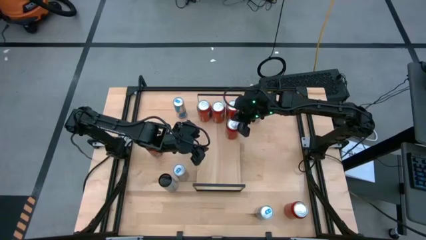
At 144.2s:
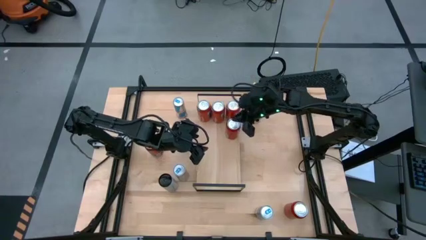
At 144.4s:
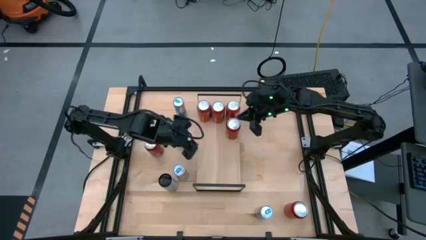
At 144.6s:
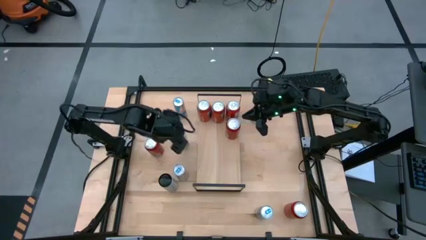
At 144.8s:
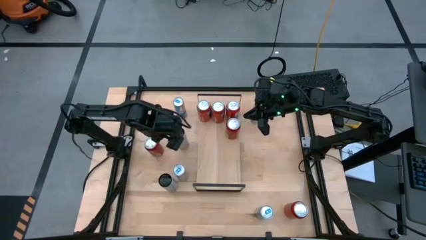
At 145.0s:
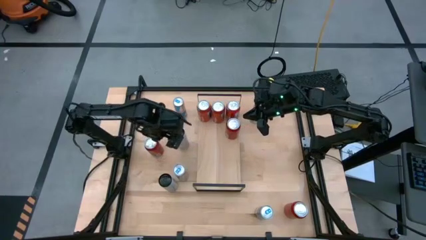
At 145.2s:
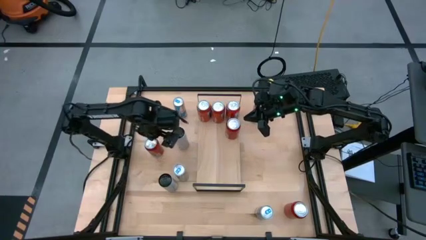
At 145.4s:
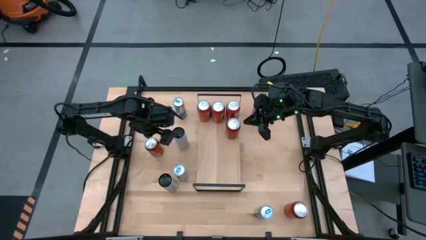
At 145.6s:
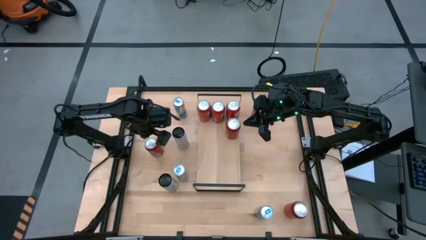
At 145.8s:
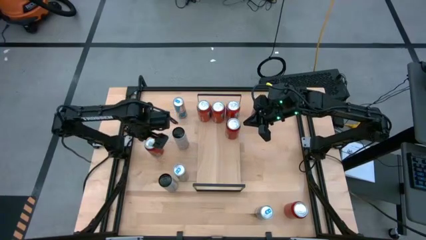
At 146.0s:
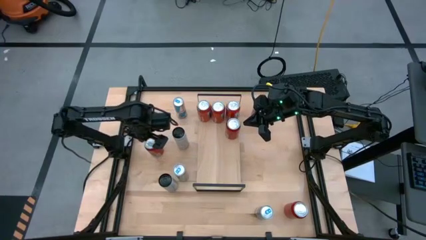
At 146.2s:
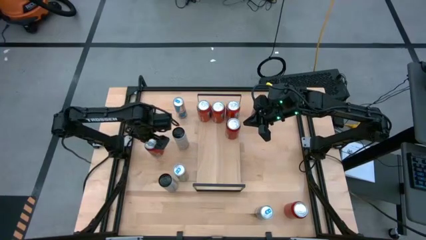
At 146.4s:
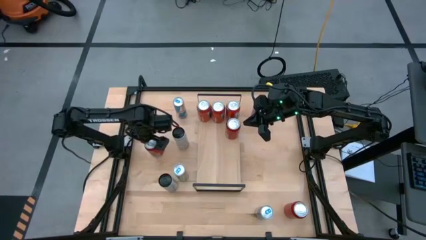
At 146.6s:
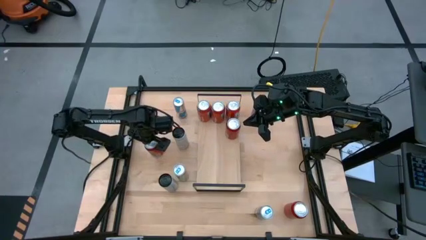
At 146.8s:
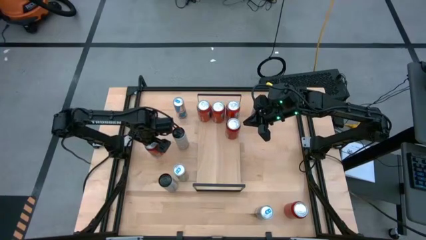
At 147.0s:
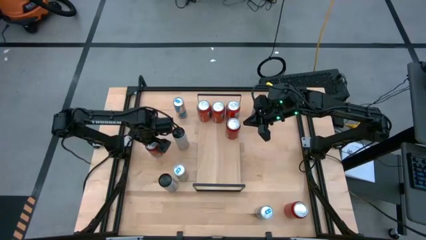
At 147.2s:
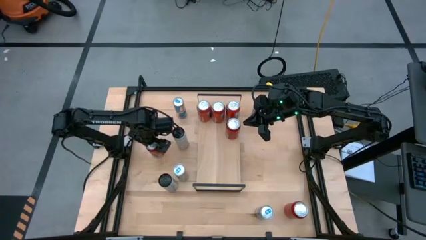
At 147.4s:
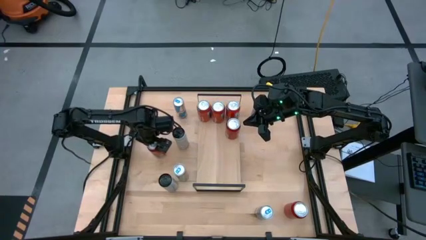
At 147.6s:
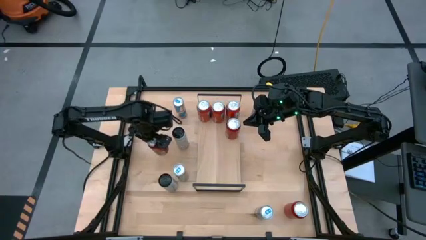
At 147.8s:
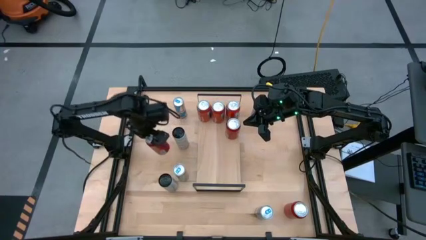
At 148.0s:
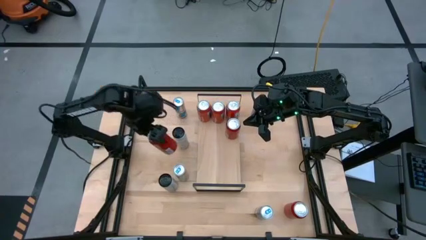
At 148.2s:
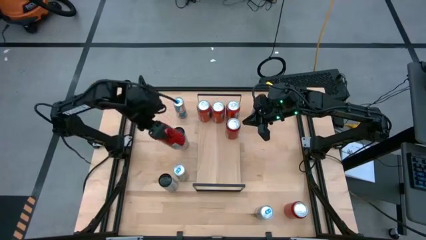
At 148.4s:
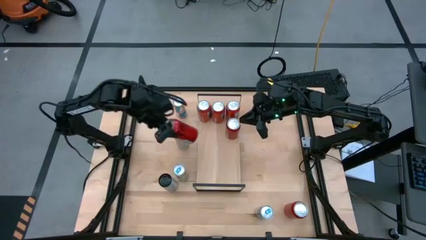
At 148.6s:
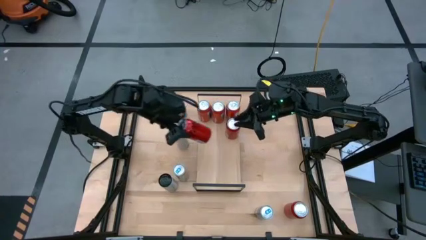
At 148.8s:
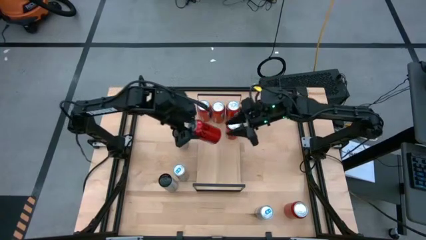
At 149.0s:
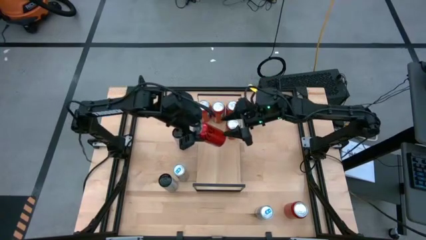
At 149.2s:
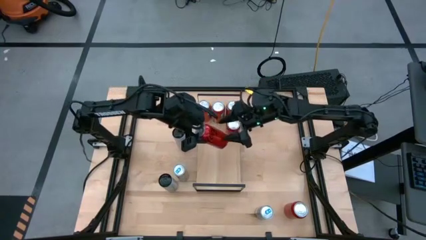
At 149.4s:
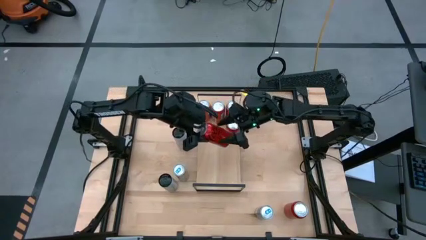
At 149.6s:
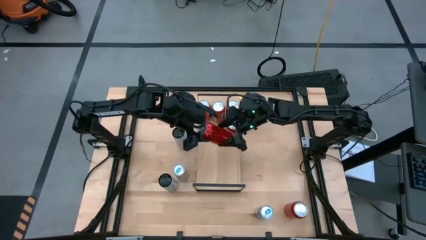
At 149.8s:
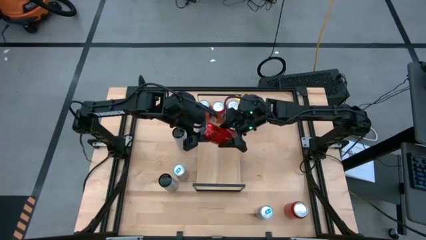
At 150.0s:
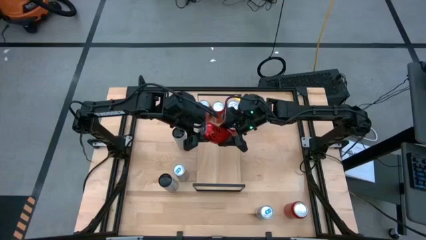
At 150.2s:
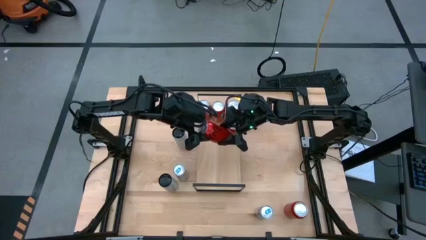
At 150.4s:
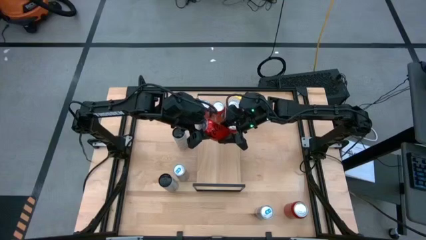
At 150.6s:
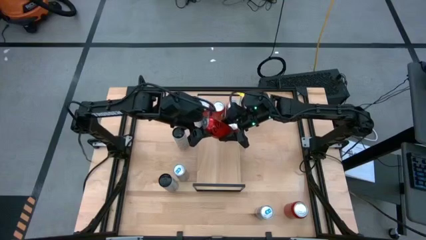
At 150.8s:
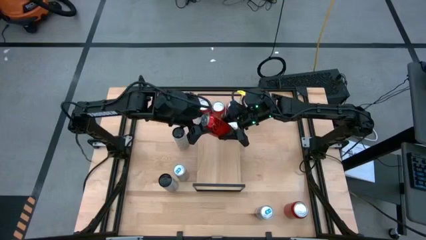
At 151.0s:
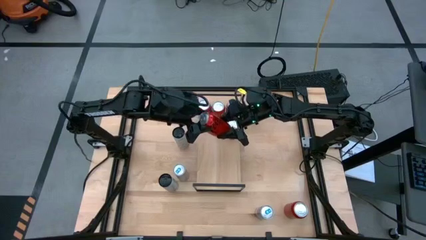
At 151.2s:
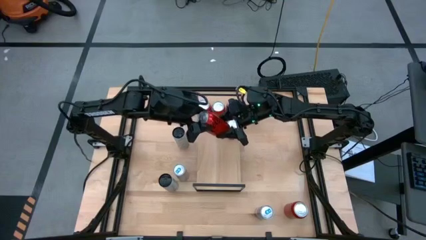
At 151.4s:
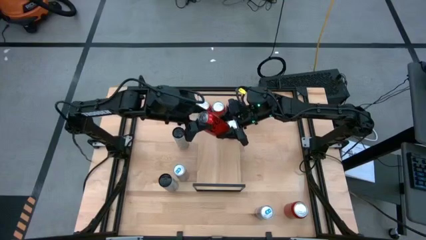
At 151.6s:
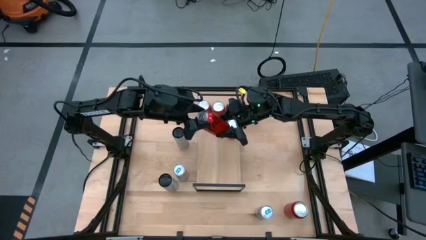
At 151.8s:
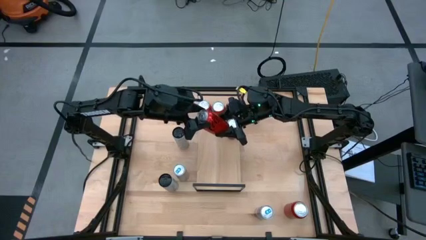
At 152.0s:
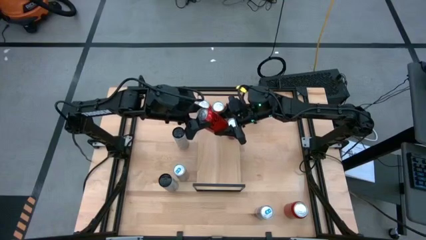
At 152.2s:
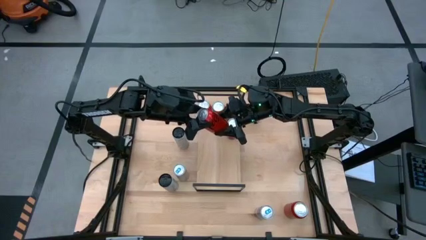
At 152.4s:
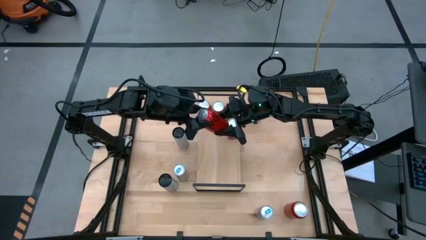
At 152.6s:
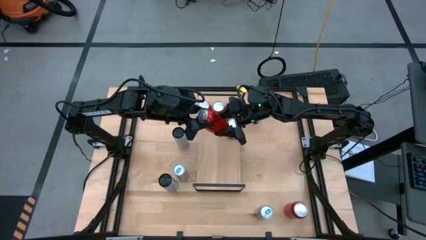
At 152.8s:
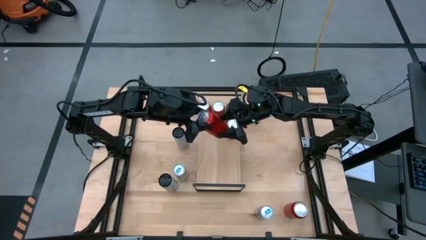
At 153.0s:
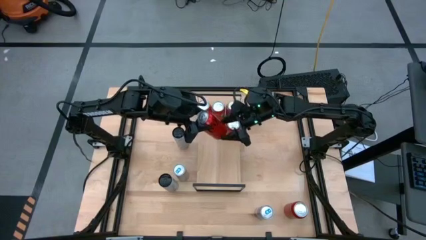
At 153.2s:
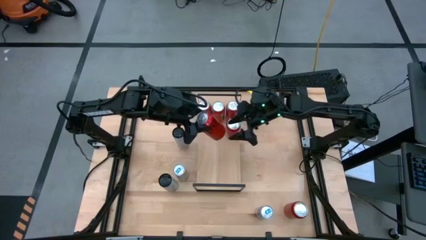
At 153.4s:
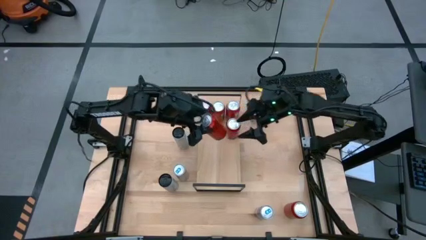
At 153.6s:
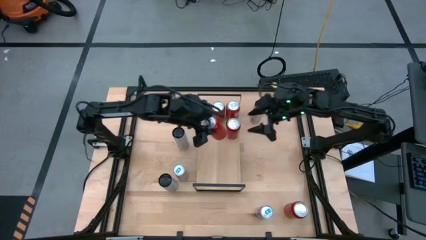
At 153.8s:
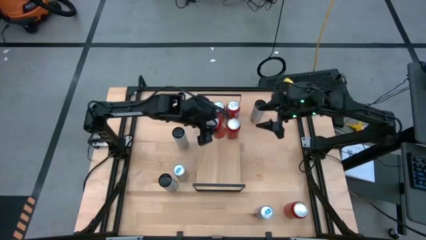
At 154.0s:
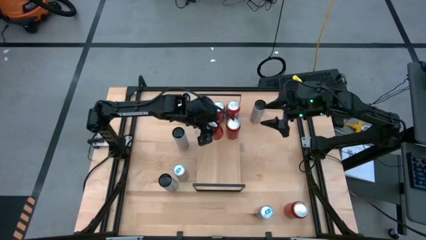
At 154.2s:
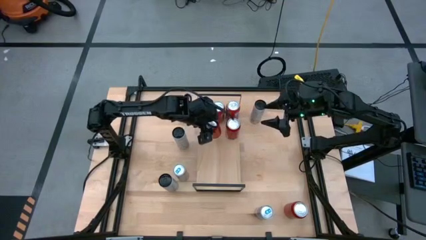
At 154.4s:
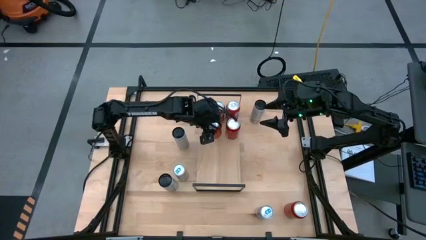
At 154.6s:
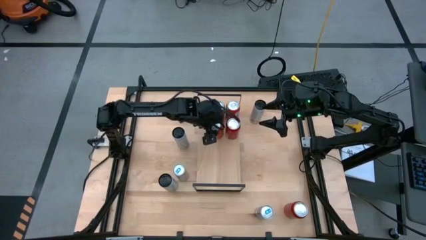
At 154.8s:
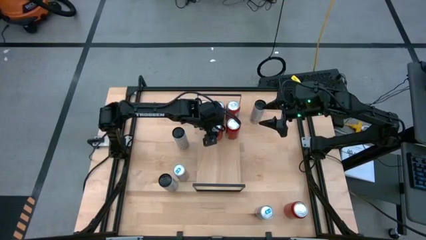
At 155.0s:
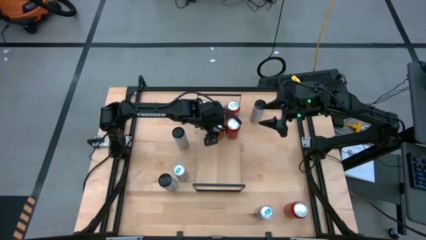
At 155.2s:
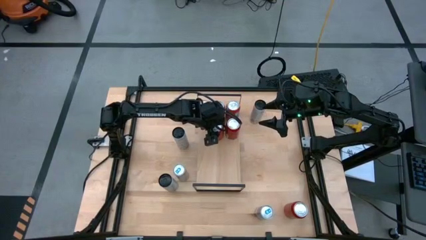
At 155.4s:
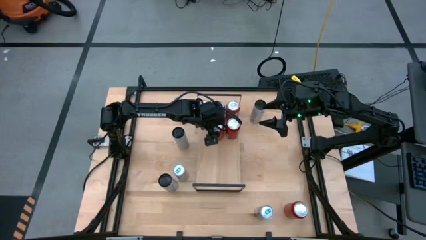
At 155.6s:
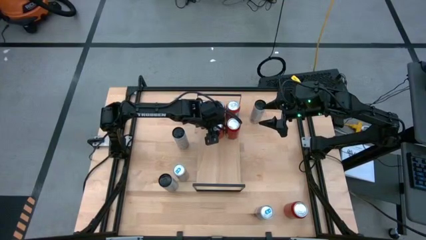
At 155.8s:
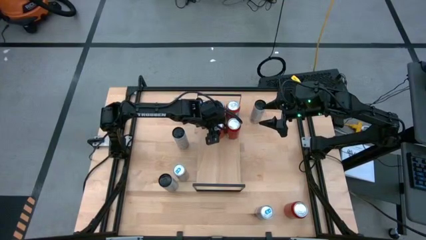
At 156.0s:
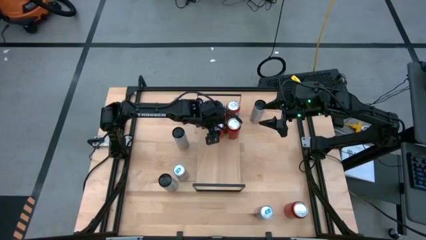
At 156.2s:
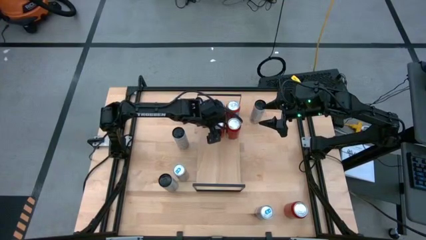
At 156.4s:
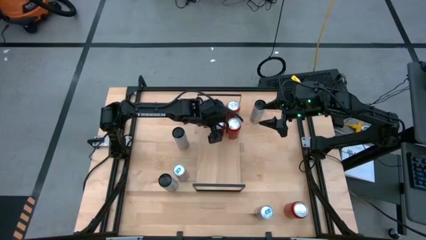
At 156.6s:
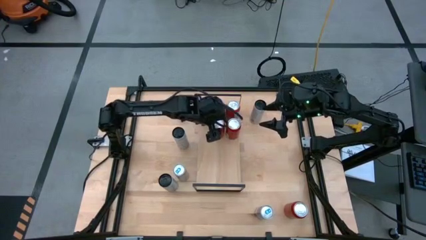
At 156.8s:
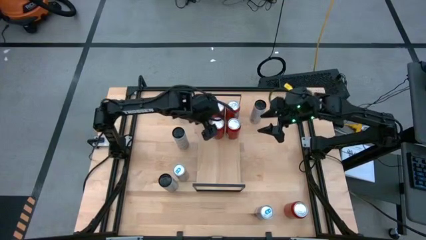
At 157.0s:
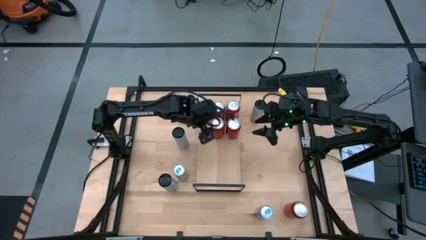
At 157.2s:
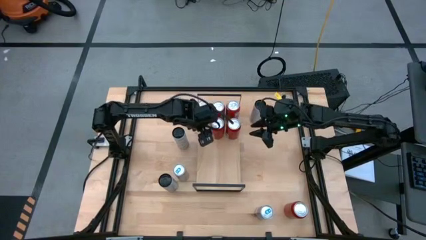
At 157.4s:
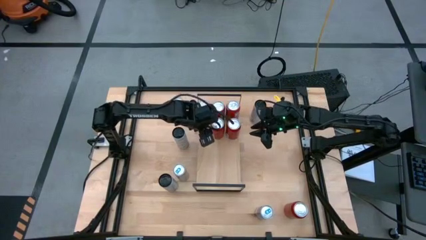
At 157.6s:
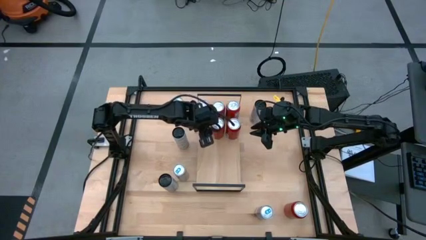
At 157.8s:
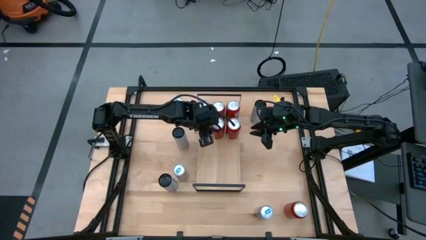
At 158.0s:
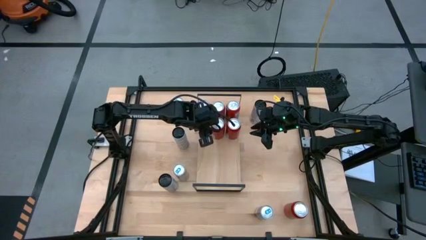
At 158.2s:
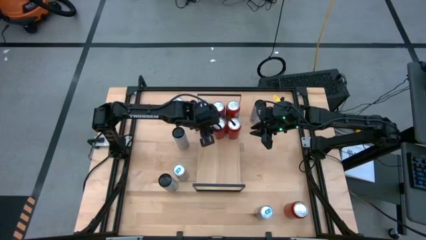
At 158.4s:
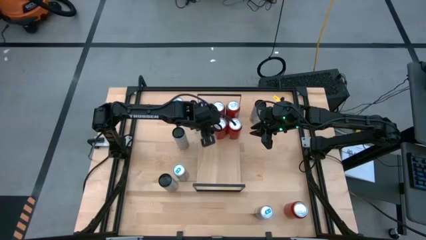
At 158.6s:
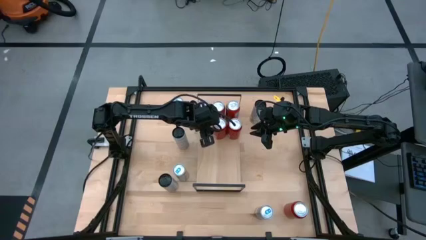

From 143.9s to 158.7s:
Task: Place canned beverage on shelf
Put the left red soda can on the shelf aligned with the other red soda can

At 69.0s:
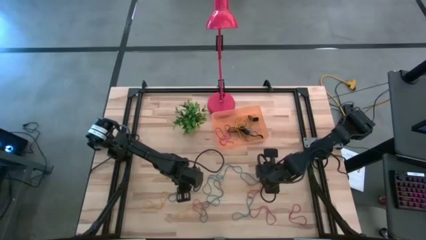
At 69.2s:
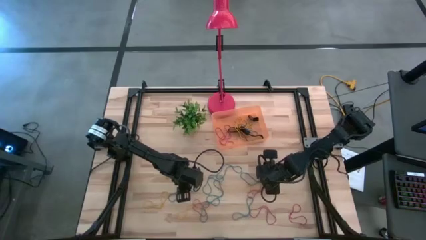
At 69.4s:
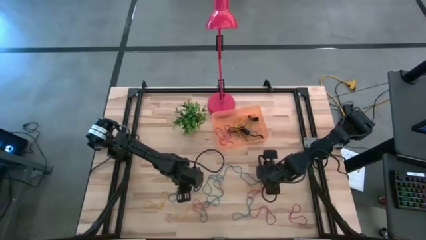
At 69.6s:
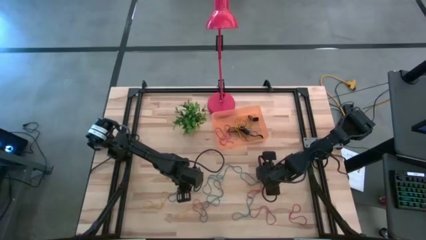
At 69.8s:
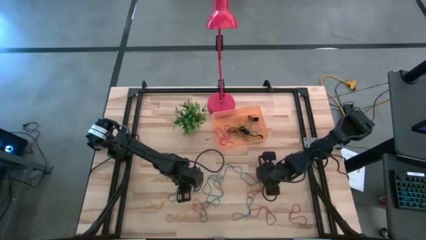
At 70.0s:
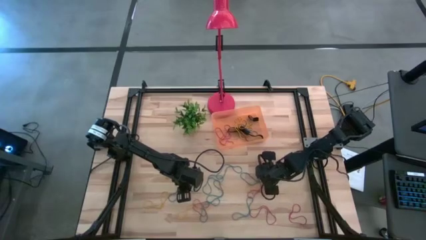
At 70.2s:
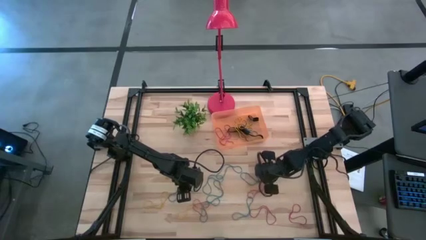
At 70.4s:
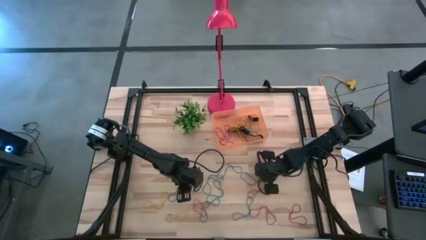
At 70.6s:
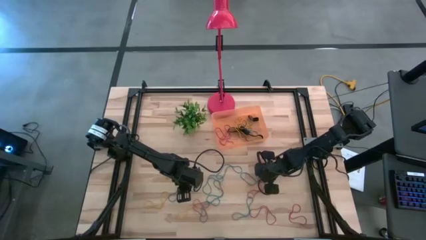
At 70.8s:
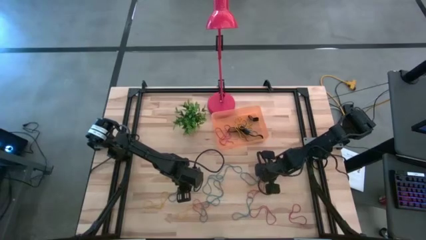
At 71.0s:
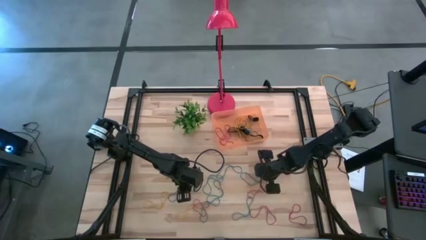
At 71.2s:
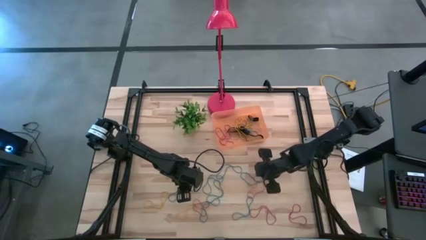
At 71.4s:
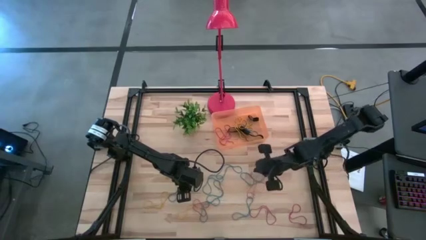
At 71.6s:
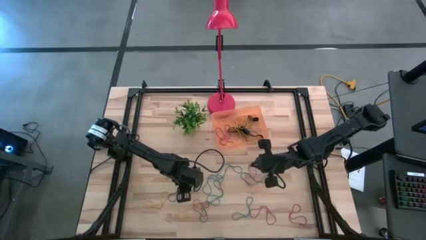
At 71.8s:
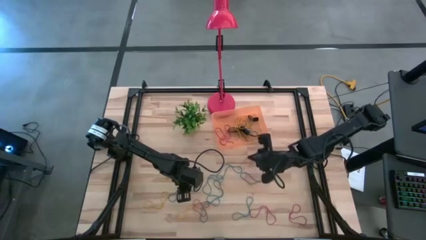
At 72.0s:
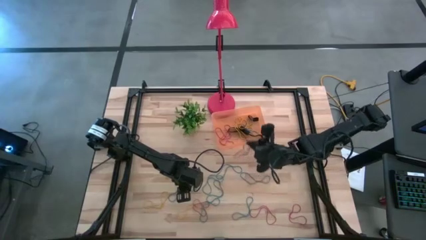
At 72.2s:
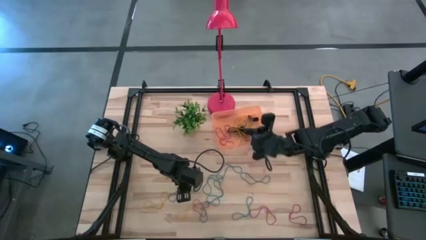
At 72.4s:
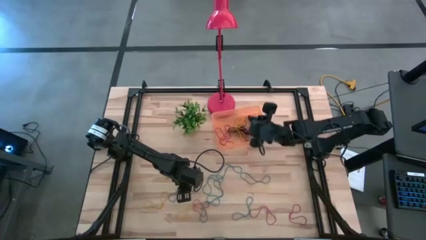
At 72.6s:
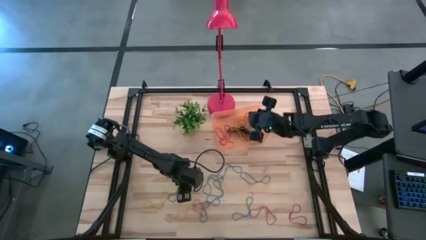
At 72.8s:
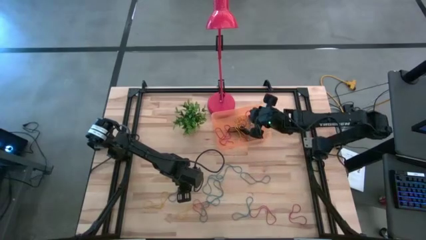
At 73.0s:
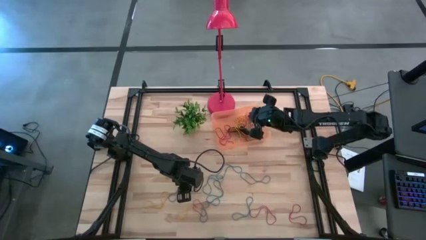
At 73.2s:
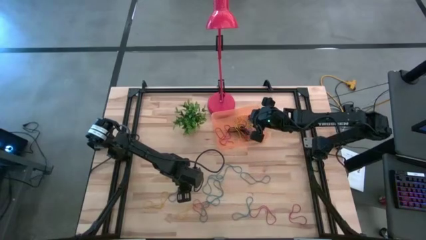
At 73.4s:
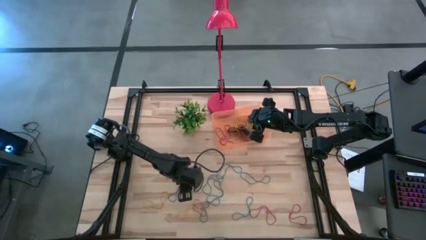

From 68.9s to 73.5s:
Task: Pick and place rubber bands into bin
Put the red rubber band into the orange container
